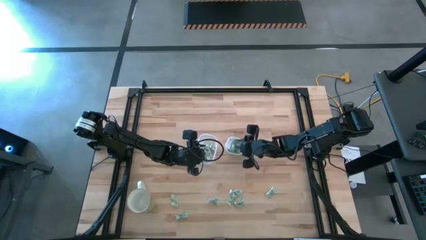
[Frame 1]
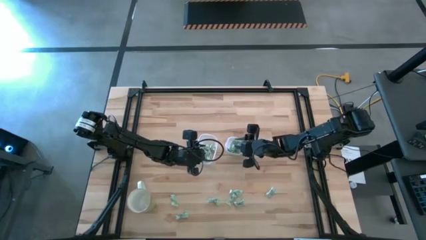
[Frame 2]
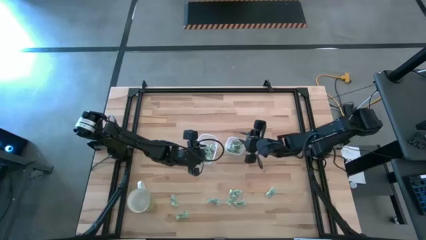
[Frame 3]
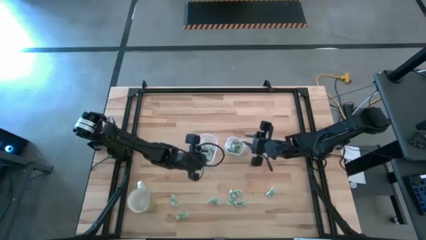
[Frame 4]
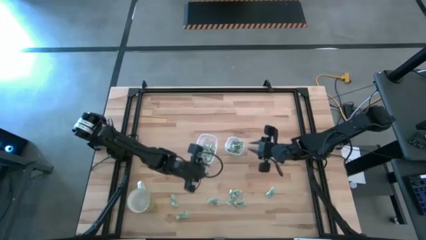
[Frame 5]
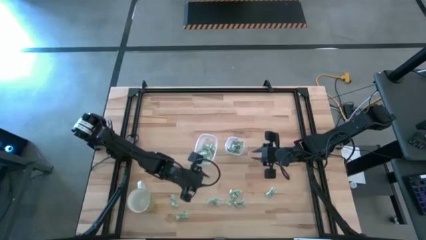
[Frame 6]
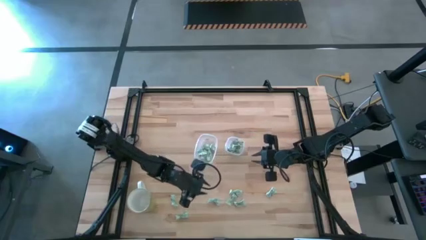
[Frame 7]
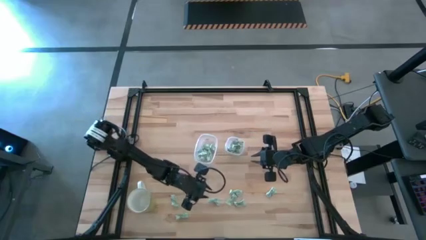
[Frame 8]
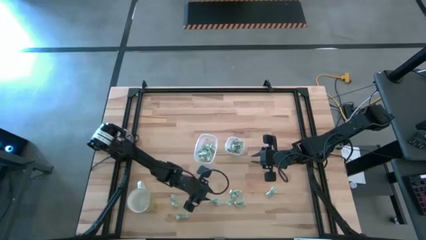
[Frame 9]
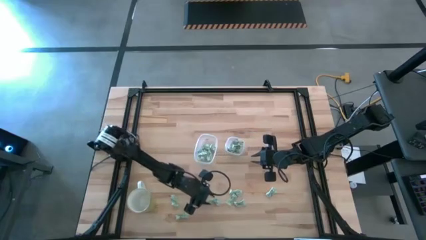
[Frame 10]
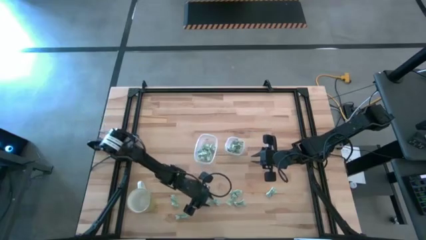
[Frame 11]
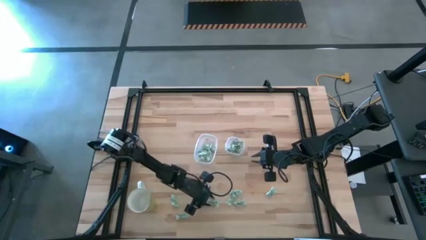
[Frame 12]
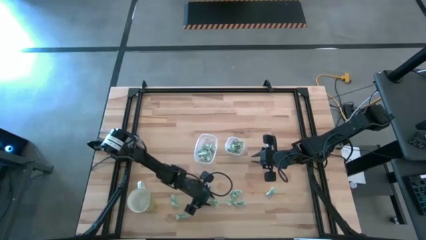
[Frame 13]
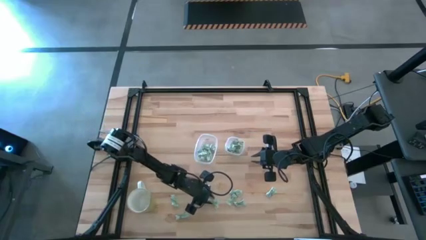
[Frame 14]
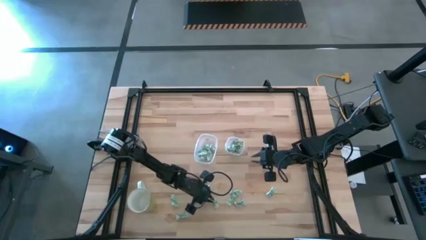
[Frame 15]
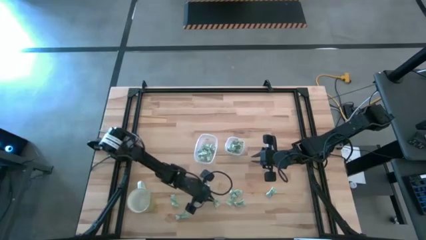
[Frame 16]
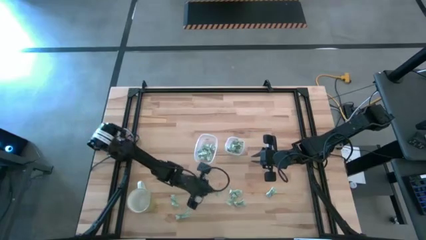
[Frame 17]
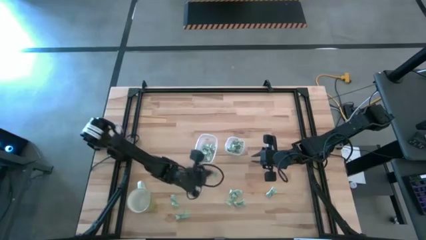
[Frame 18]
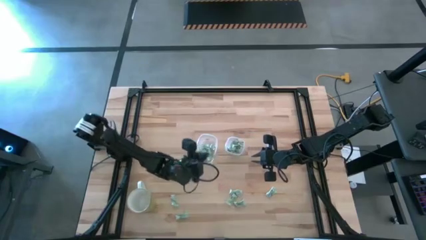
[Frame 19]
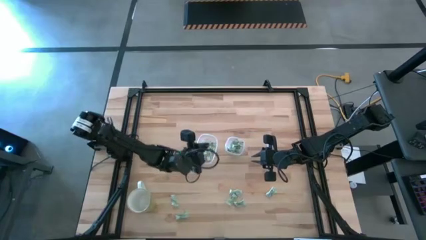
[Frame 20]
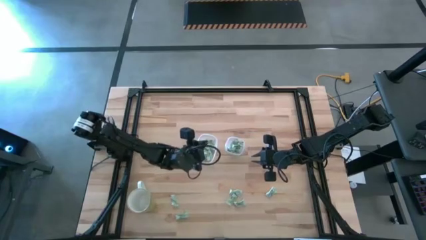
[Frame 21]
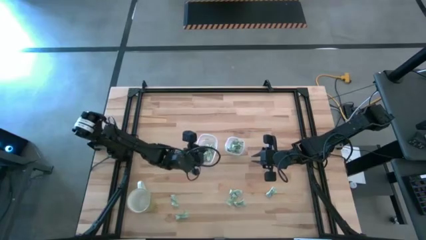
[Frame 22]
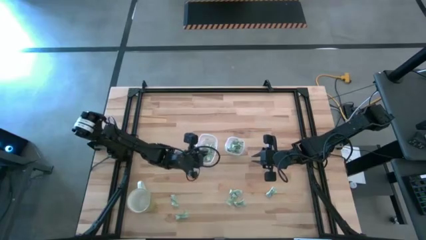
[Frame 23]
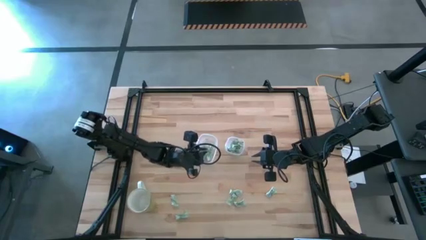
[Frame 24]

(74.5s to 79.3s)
Task: Pick and place items into bin
Put the white stevia packet into the left transparent bin

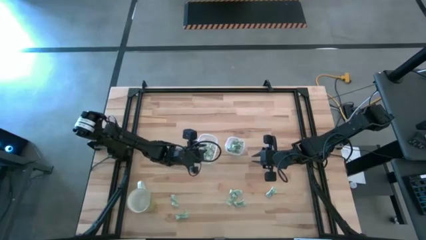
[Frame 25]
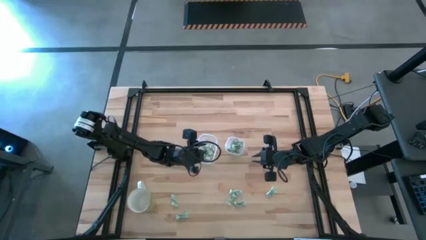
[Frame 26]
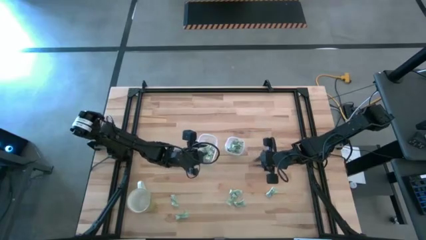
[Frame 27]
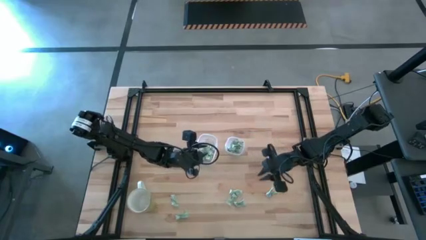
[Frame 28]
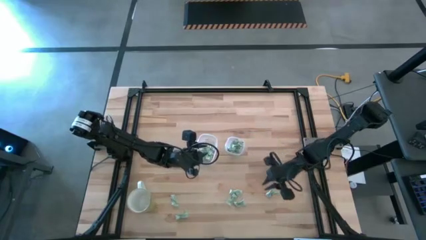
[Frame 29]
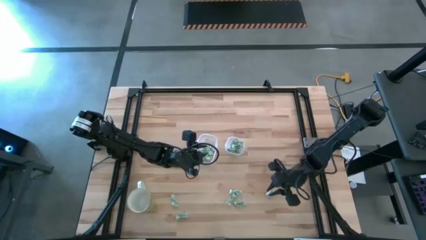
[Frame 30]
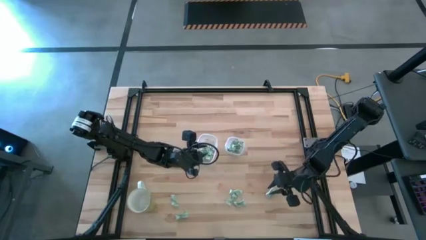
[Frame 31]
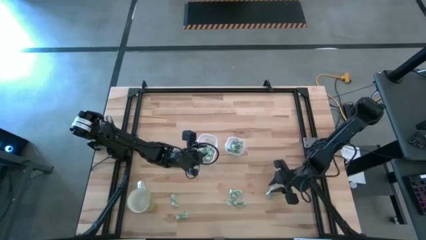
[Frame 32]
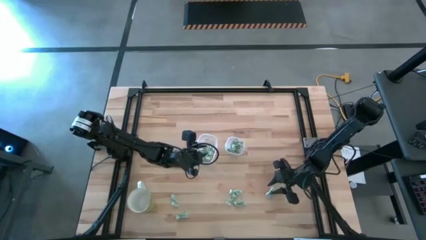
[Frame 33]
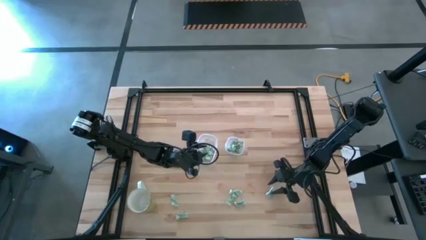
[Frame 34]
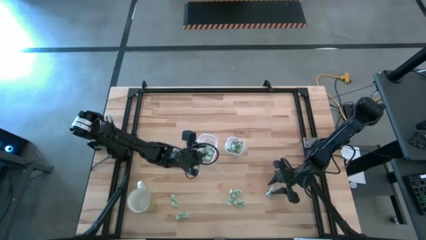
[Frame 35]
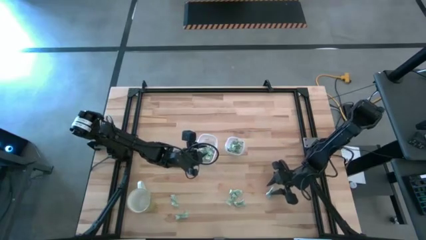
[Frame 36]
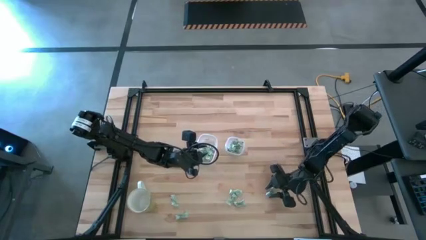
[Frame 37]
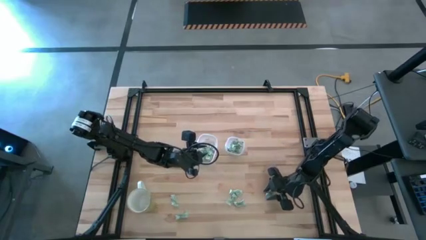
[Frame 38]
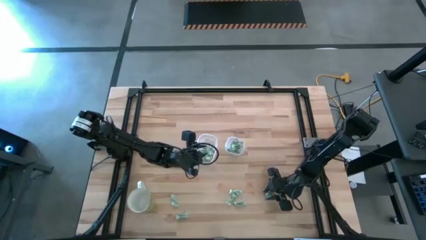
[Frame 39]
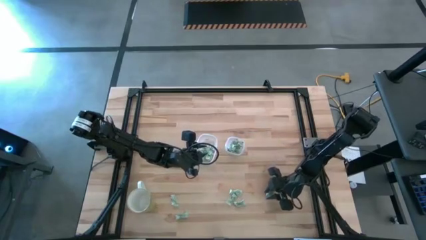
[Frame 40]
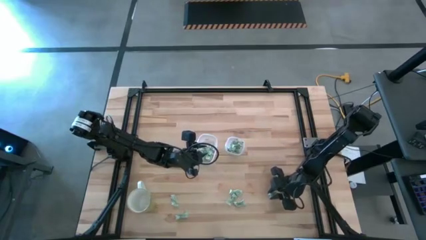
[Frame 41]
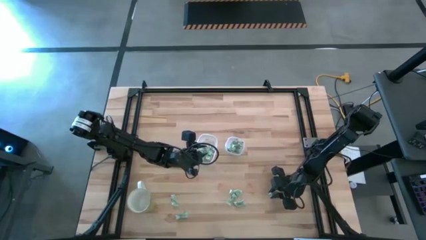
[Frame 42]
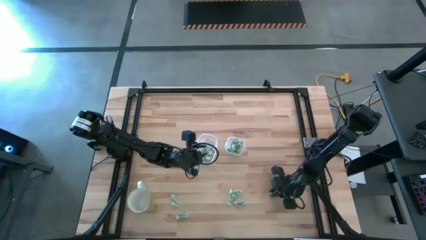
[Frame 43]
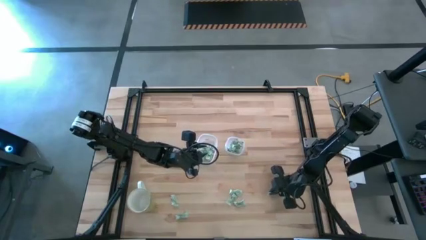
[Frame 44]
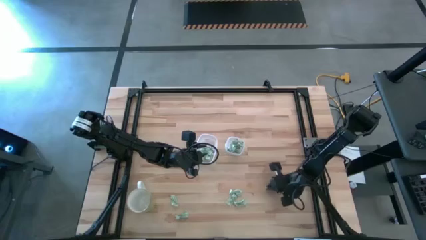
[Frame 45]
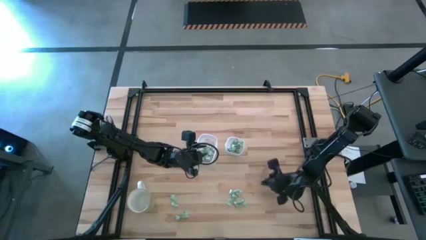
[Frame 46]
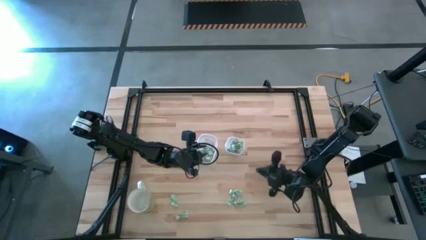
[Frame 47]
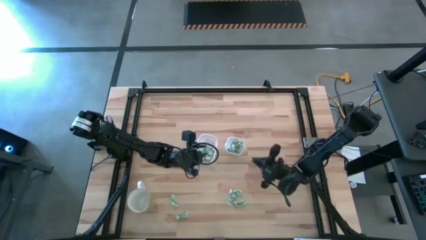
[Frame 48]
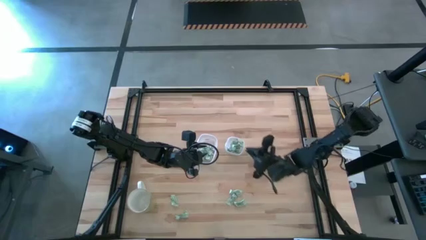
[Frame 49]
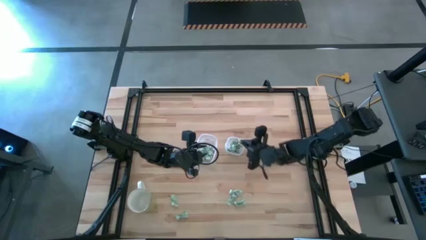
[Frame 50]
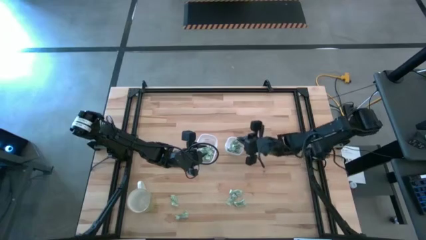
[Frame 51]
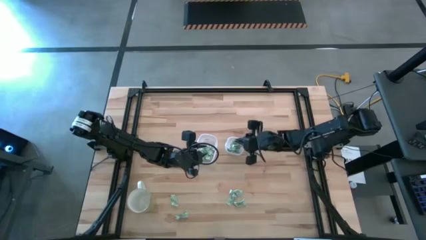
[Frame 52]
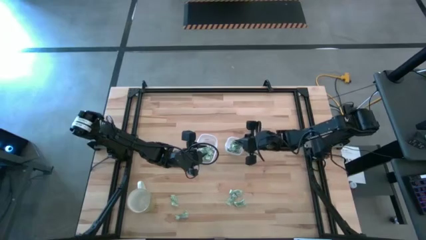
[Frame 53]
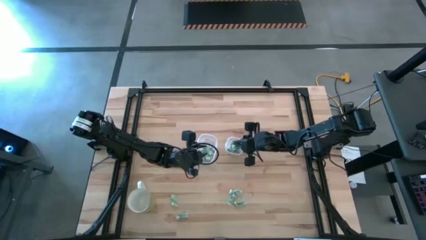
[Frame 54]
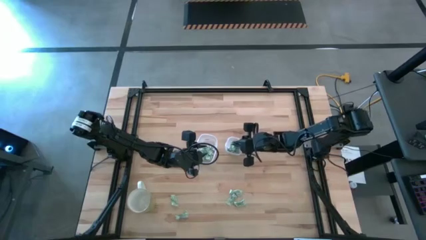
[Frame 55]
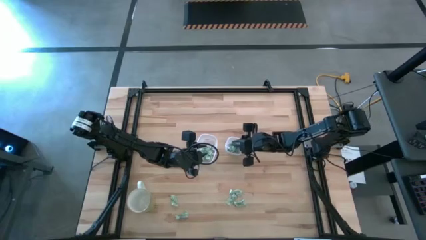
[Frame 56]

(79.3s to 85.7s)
Put the white stevia packet into the right transparent bin

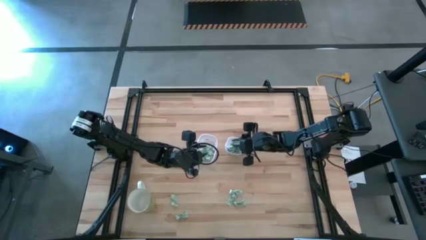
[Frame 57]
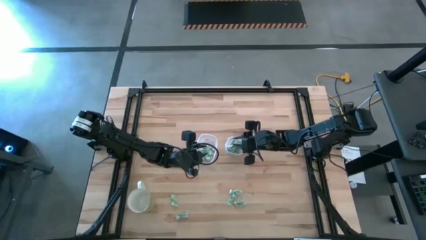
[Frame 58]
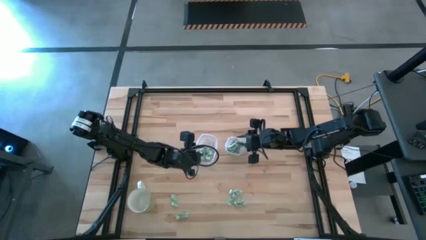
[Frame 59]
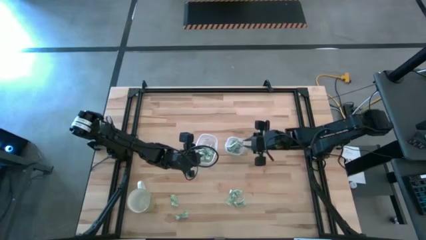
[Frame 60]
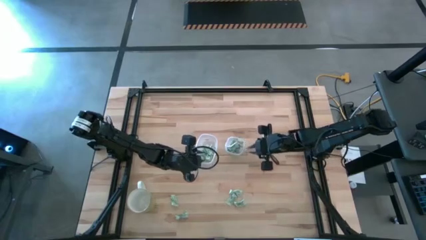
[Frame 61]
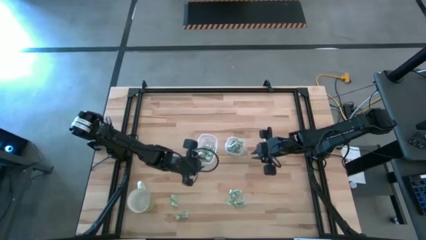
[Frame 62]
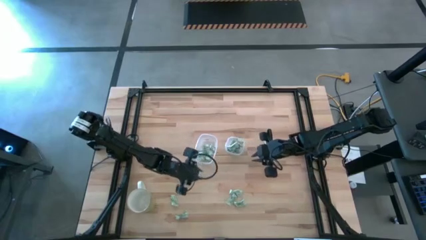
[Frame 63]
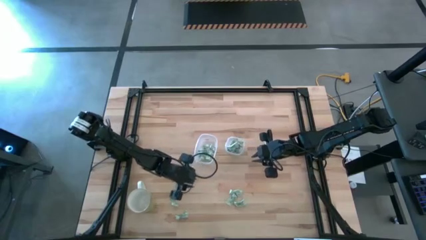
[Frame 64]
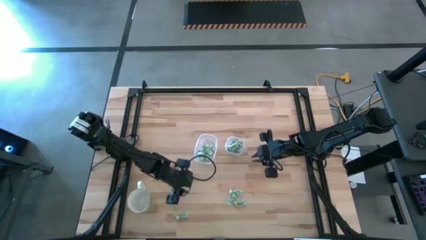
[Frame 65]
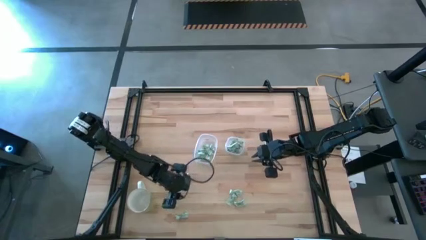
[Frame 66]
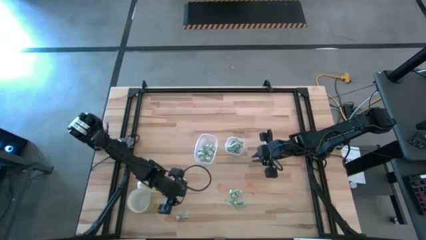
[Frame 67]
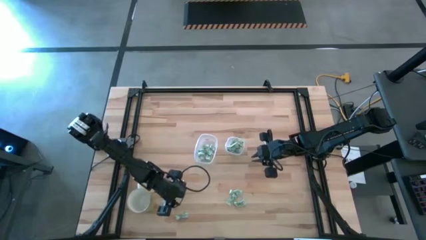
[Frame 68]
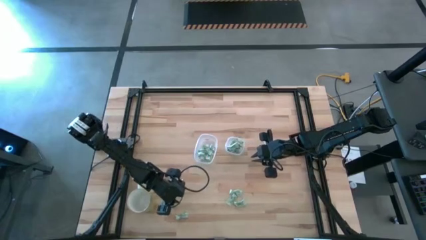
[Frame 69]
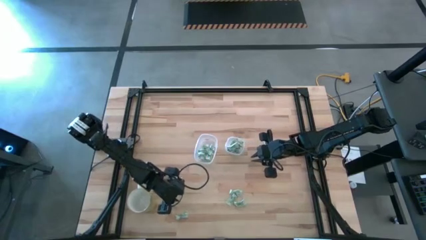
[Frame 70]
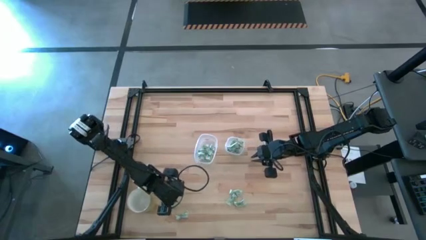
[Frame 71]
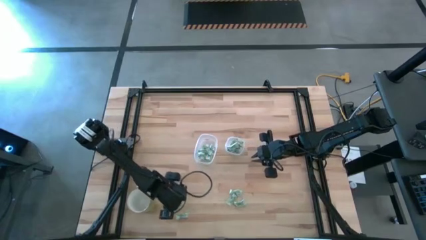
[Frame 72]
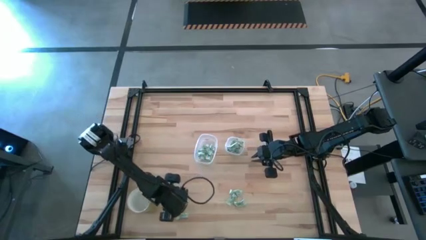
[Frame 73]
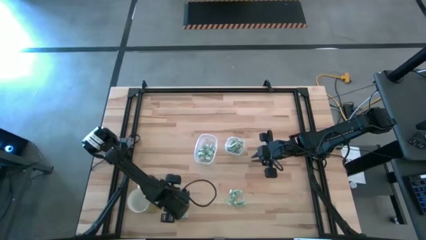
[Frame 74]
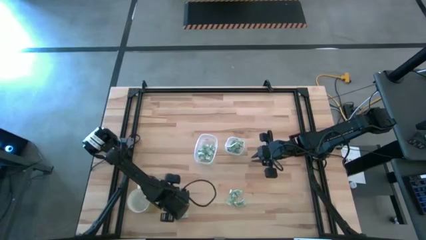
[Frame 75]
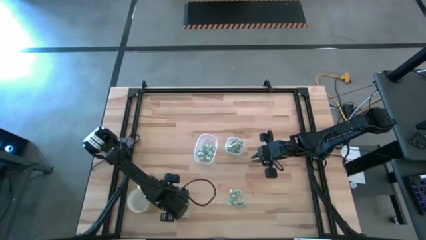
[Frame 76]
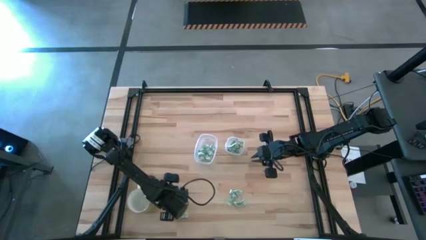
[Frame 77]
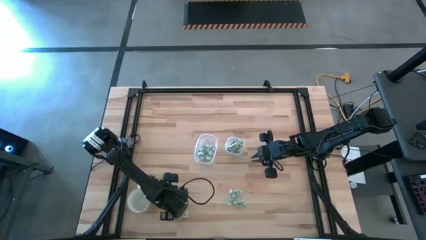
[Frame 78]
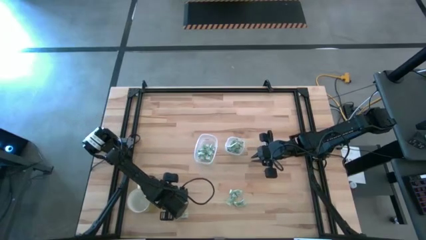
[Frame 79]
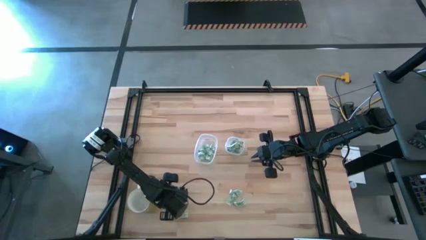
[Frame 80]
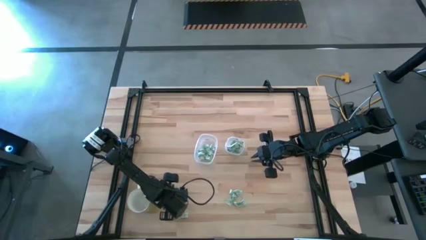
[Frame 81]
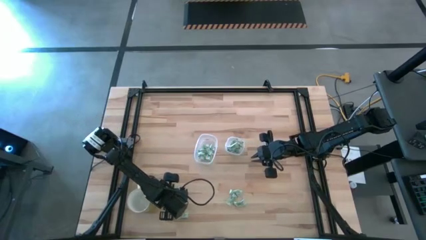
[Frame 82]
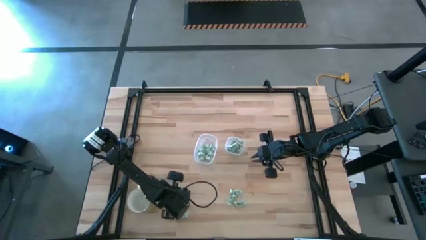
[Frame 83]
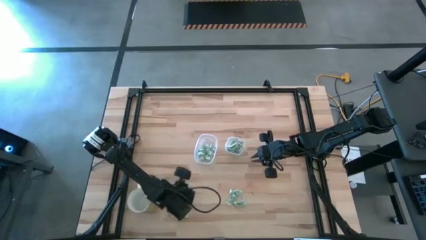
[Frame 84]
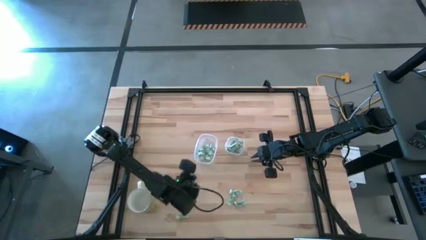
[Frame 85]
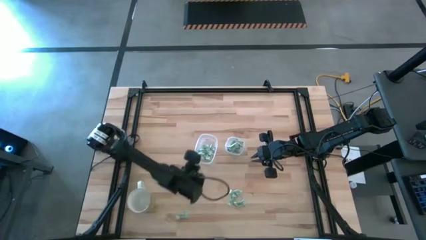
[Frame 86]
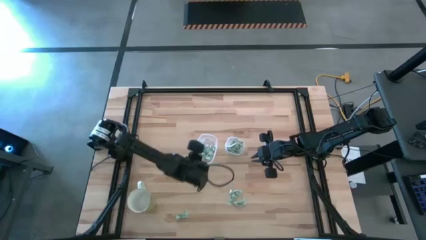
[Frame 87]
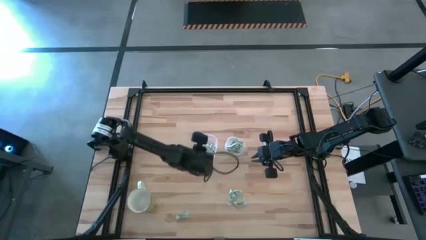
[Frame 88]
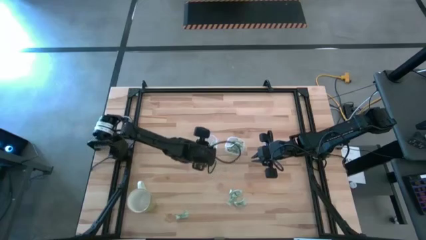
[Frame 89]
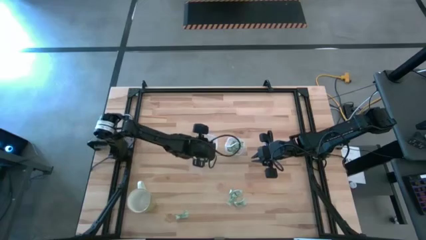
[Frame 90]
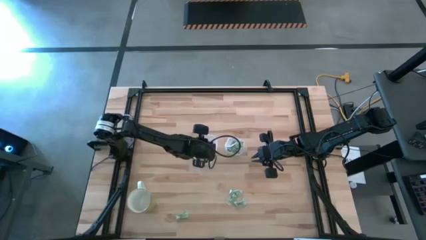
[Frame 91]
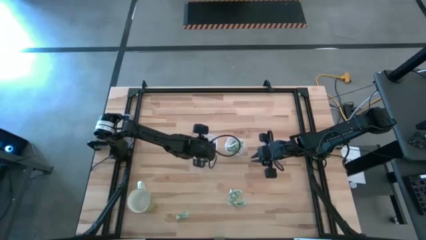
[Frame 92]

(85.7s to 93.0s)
Put the white stevia packet into the left transparent bin
